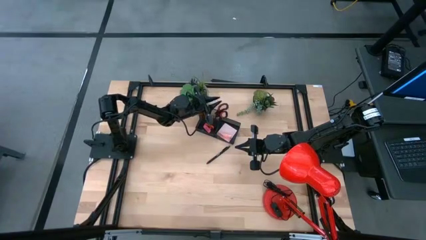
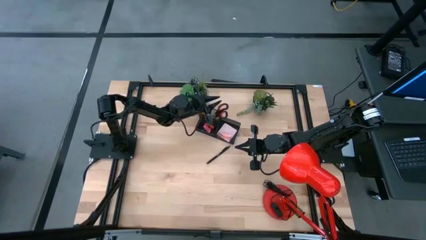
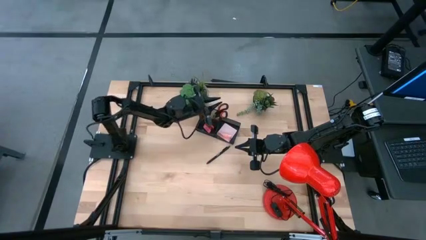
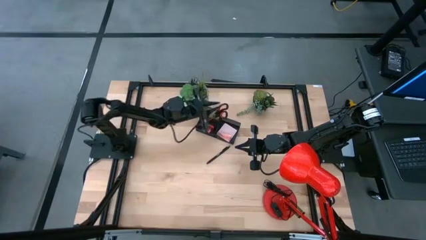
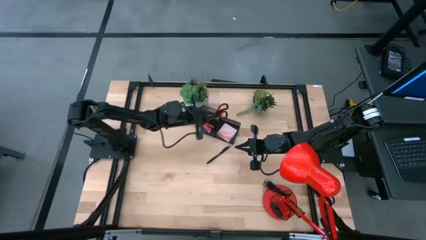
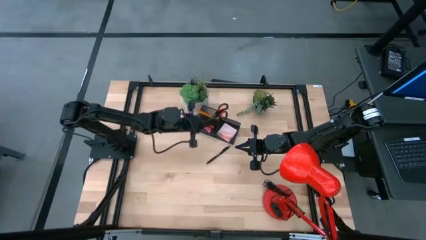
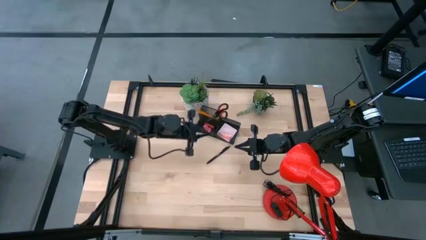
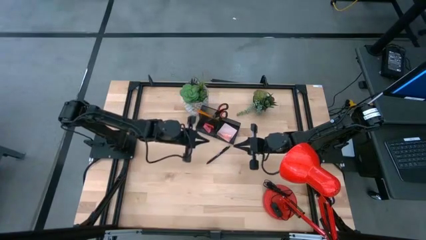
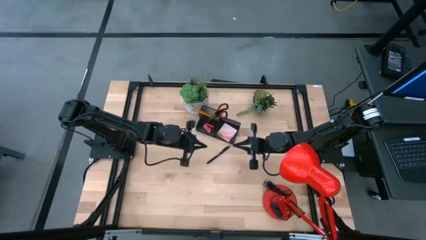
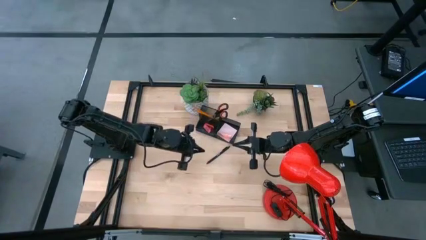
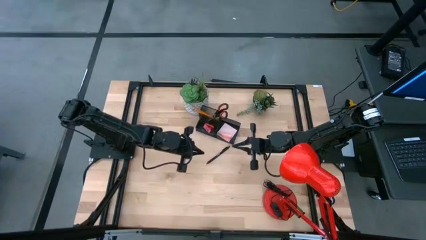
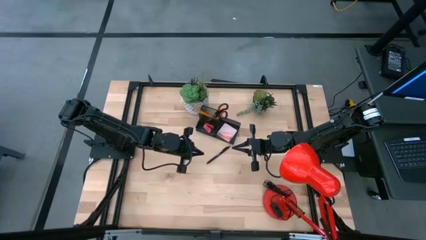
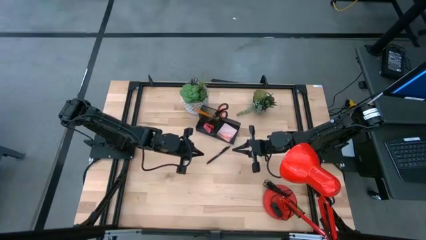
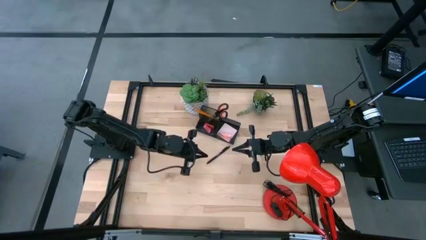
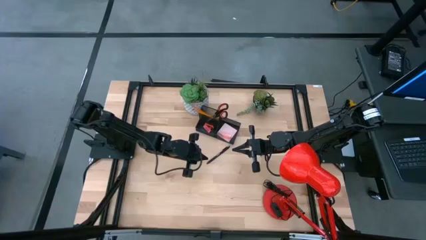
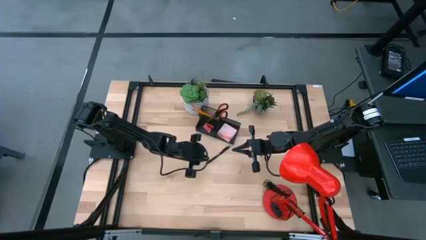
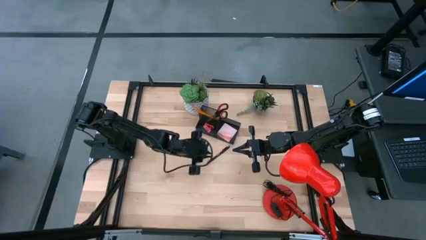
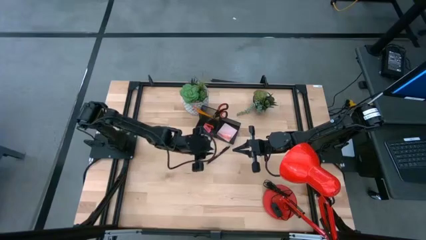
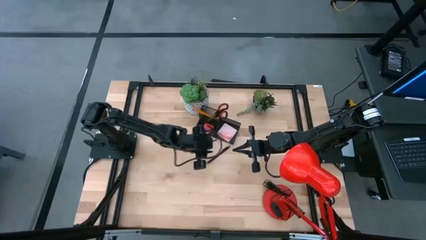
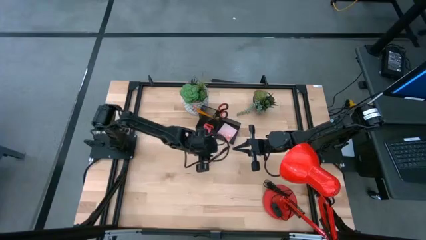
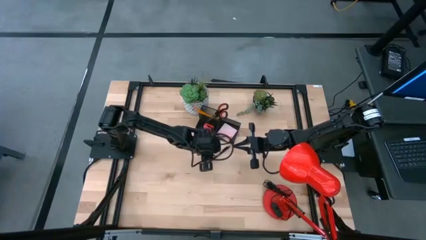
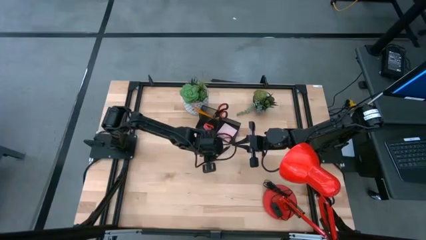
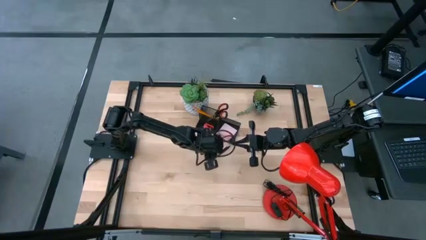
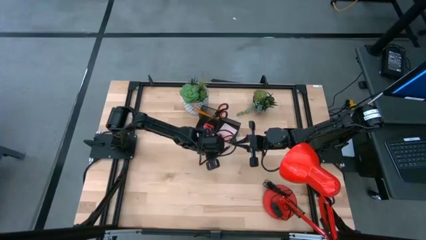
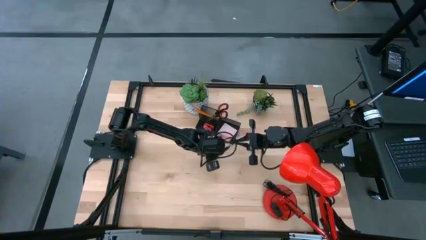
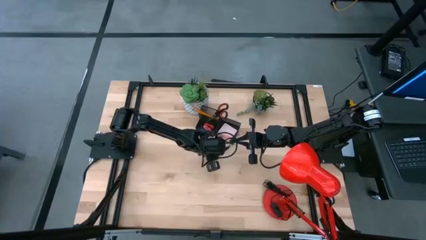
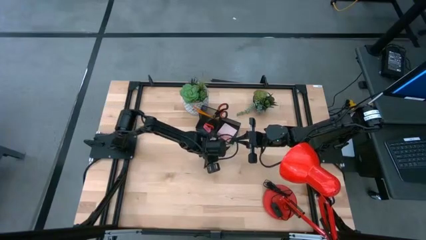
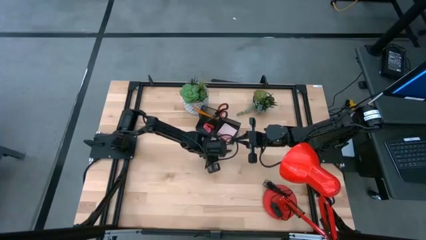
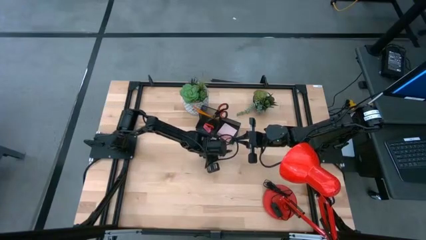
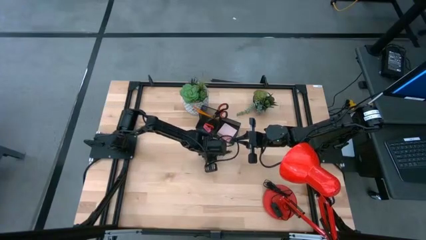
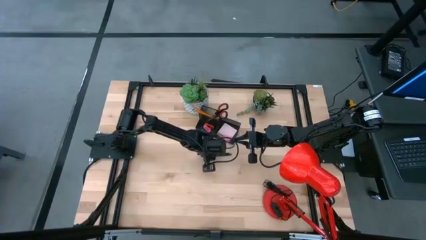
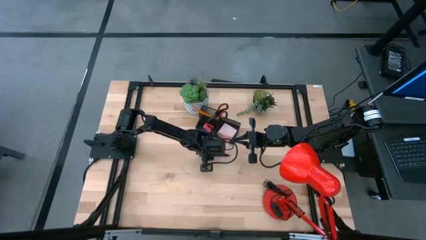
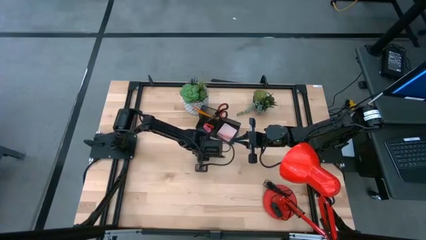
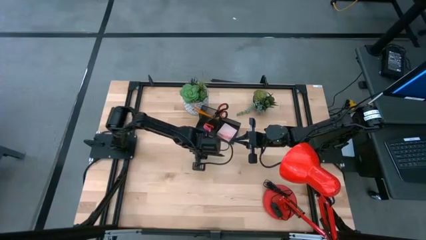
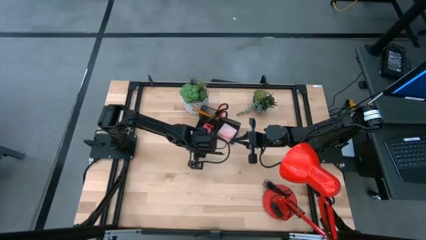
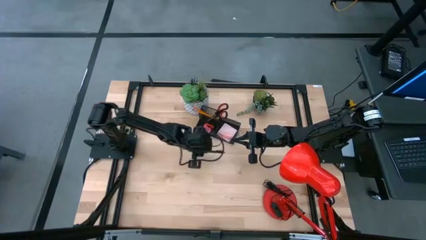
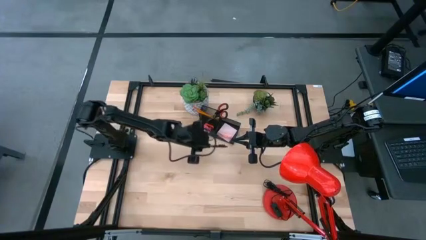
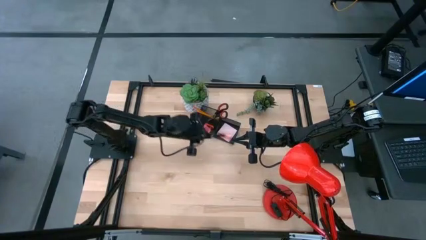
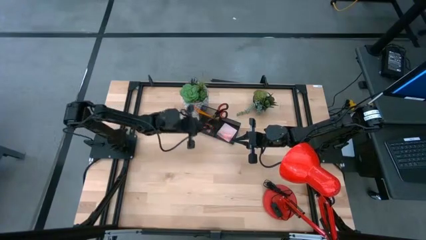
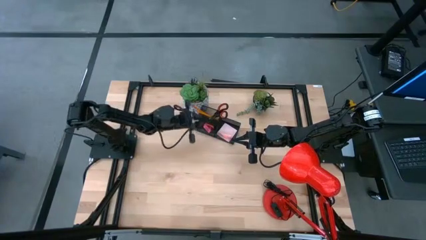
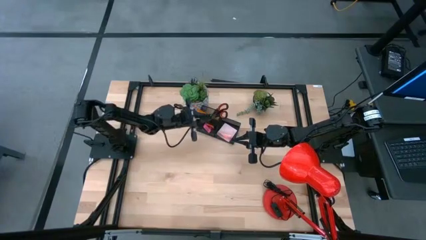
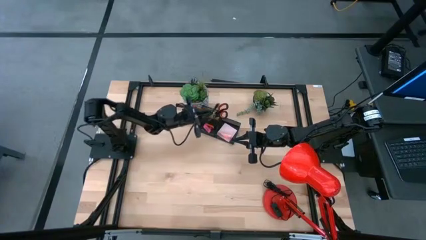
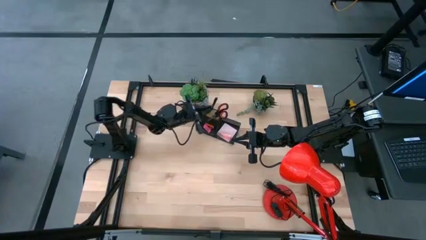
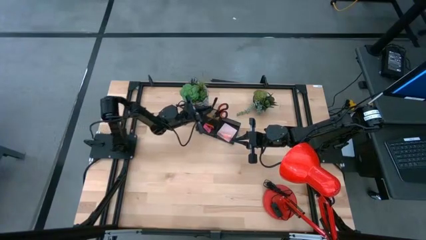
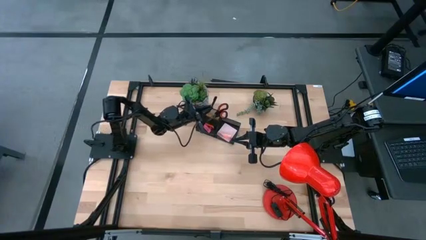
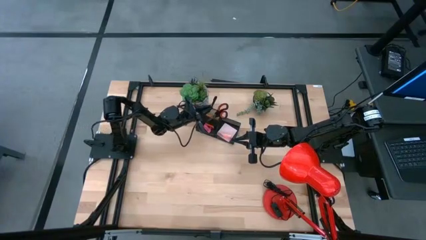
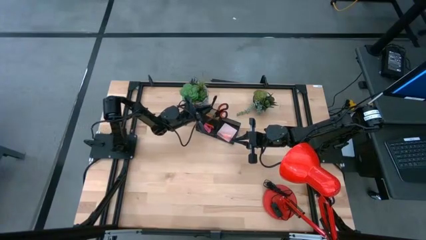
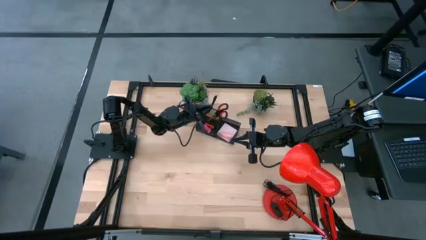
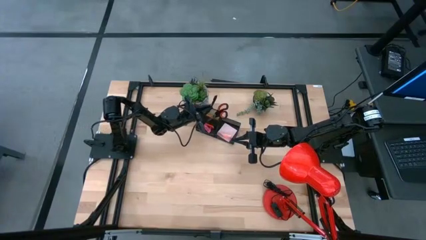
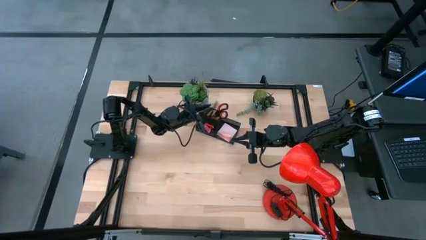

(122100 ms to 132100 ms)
Task: Pick and place office supplies into organizer
Put the black pen into the black desk organizer

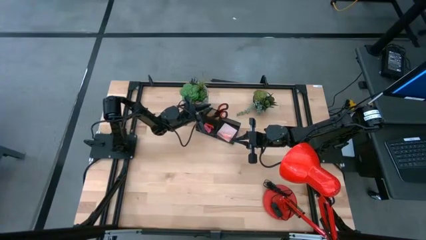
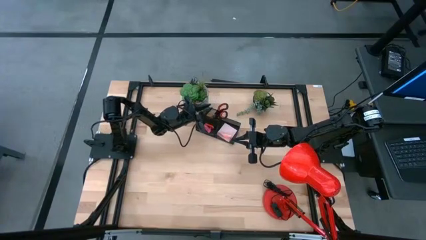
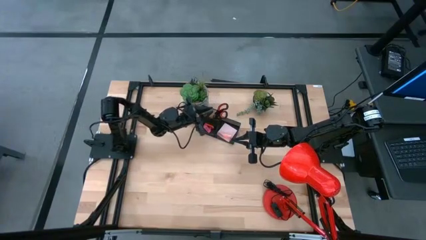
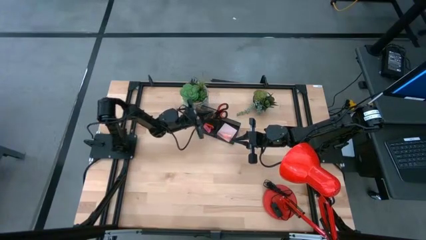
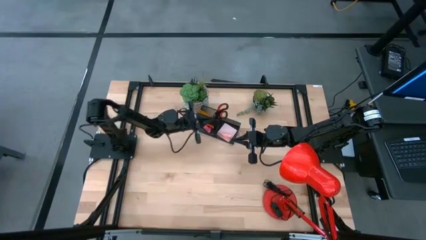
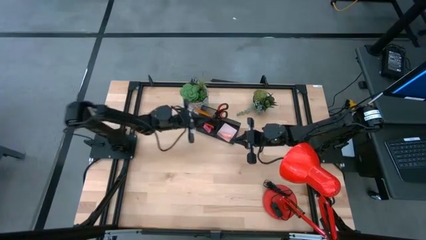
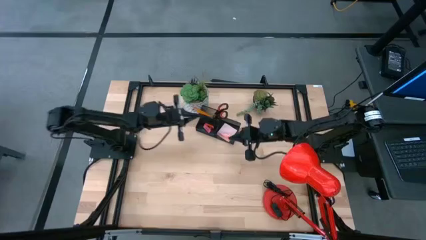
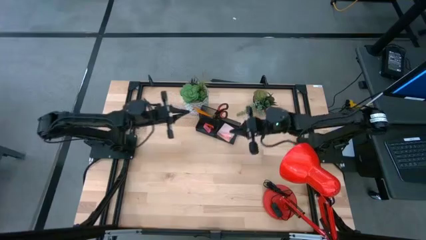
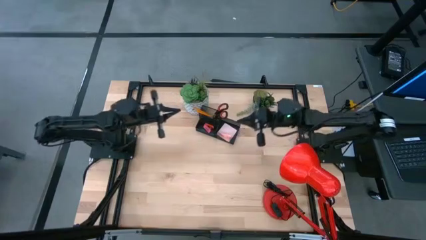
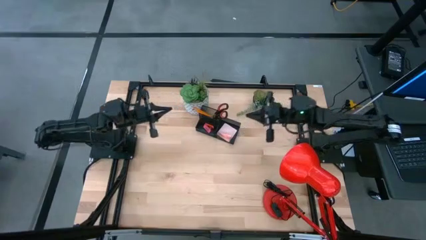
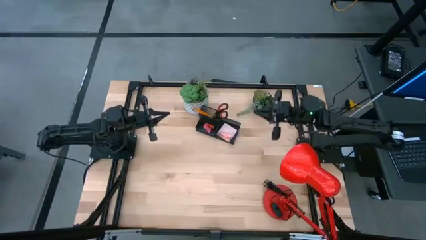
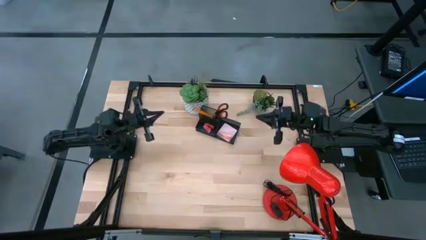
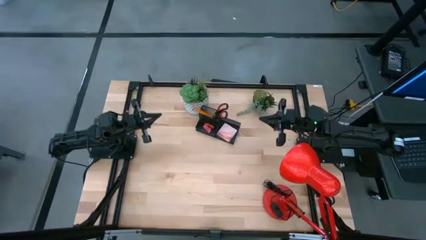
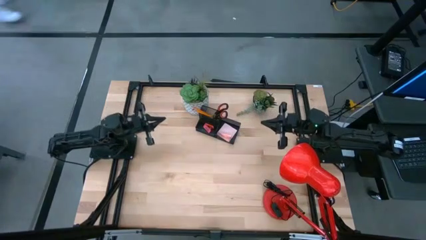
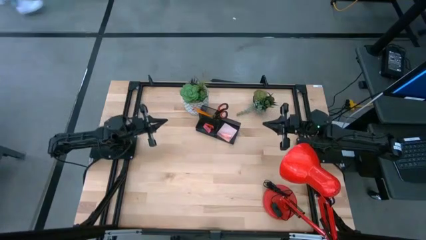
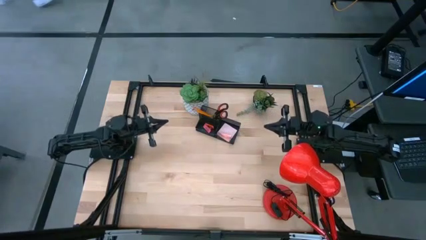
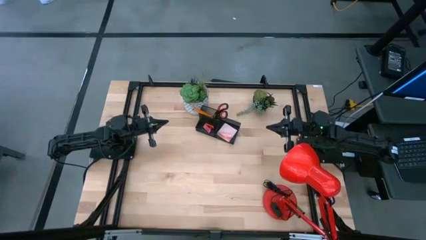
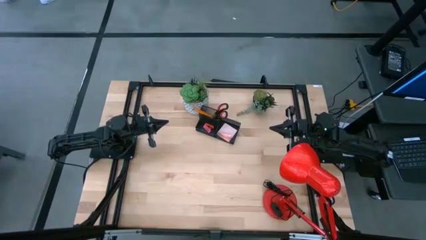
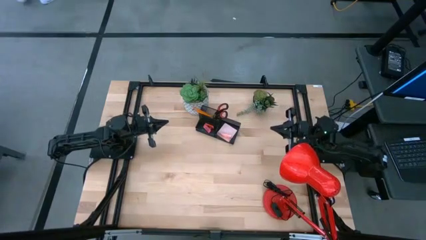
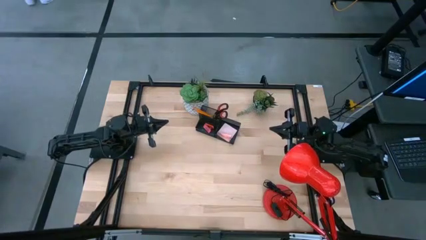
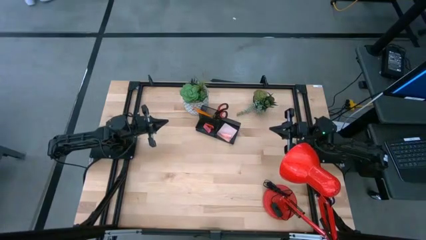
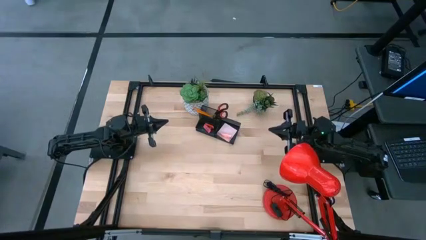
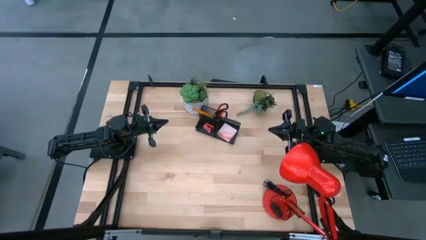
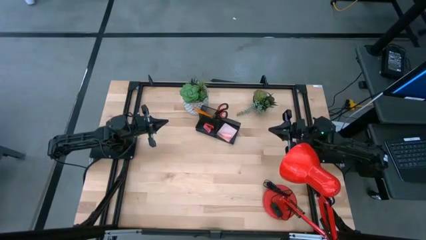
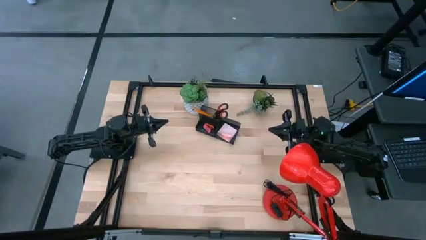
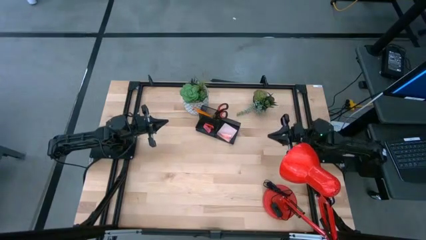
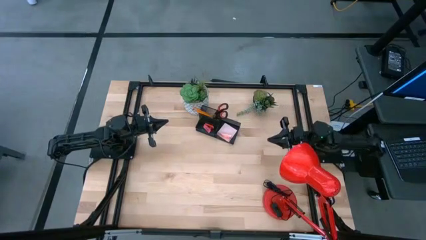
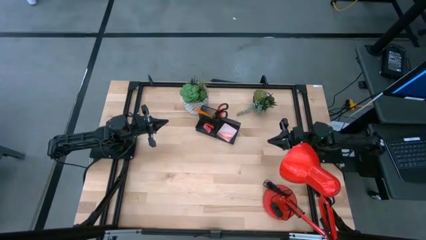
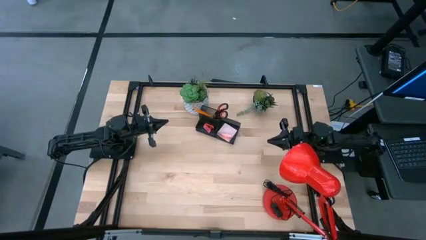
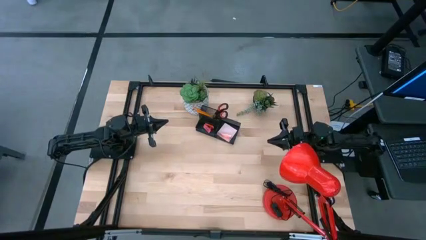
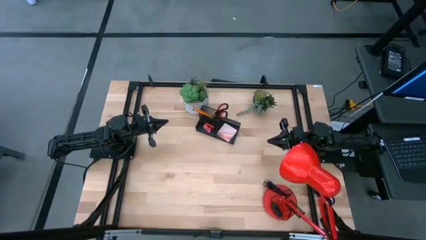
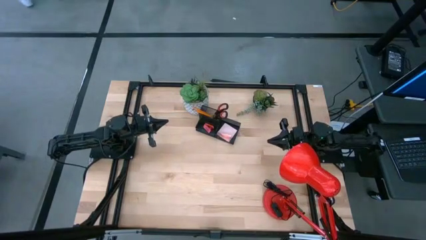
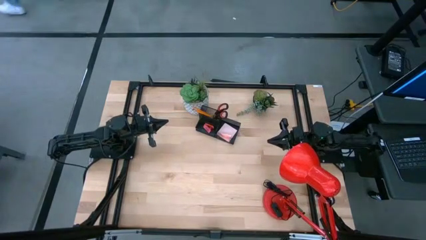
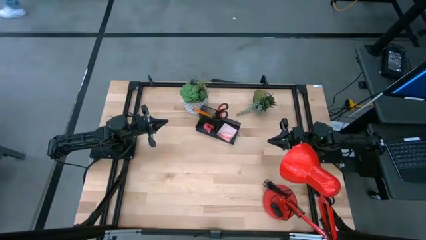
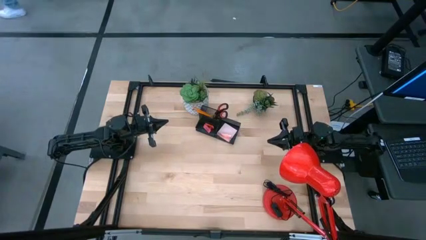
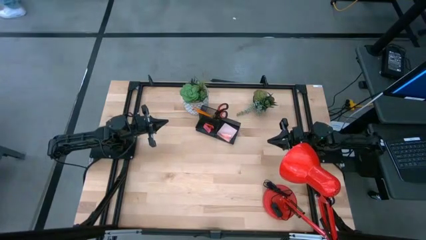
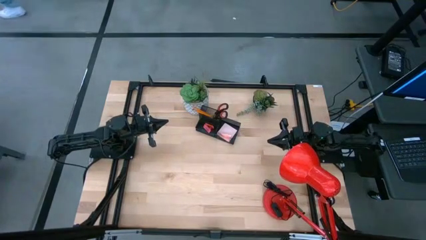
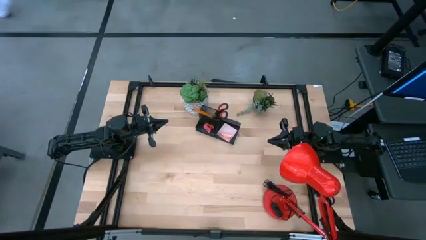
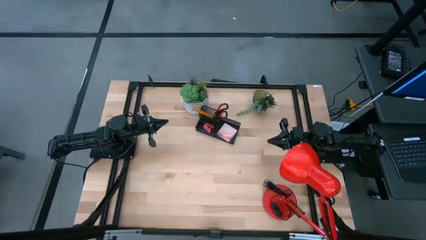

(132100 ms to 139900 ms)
Return to Home Position
